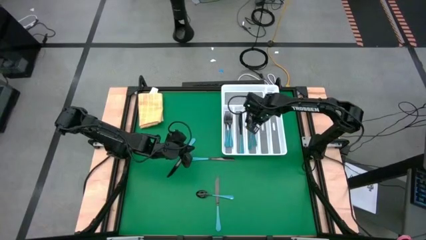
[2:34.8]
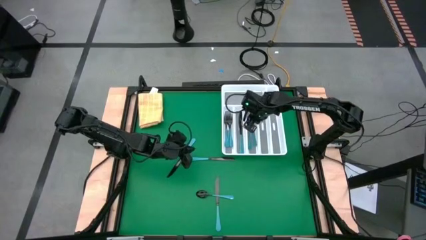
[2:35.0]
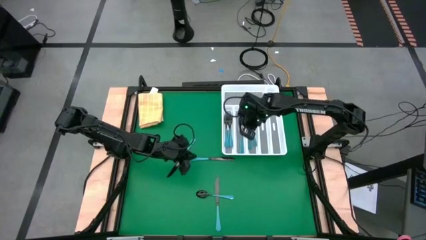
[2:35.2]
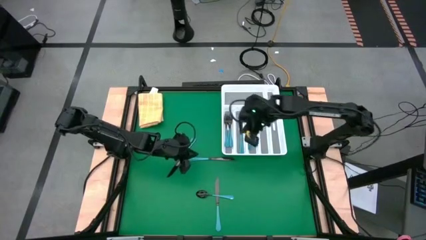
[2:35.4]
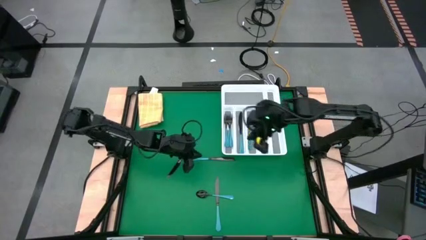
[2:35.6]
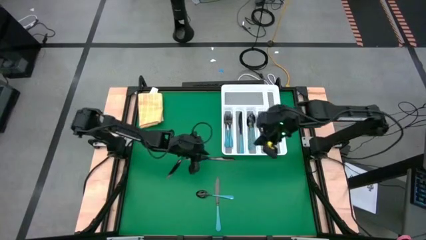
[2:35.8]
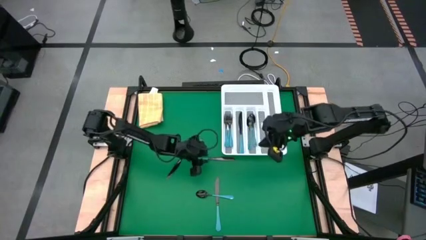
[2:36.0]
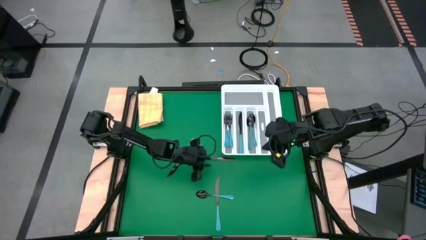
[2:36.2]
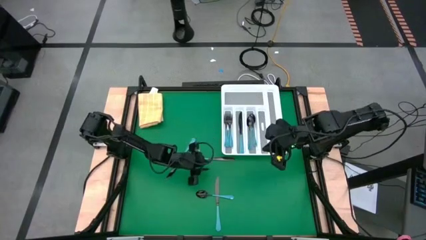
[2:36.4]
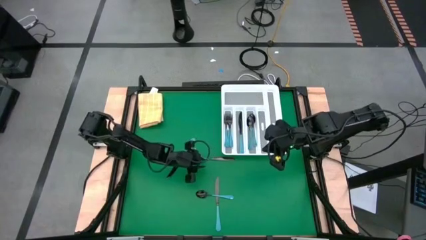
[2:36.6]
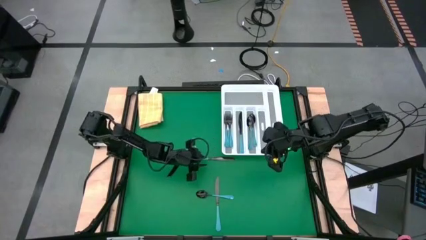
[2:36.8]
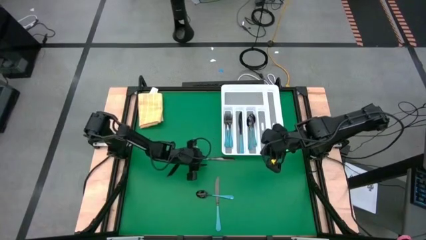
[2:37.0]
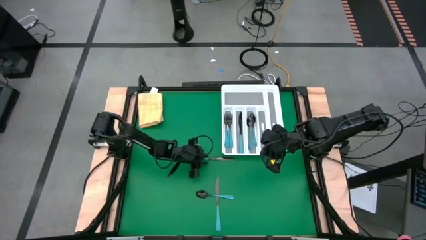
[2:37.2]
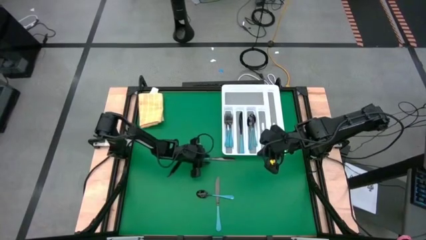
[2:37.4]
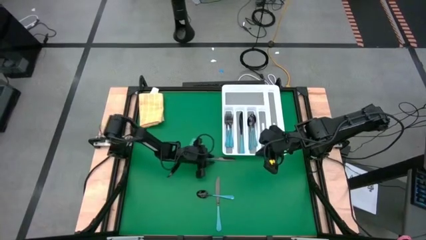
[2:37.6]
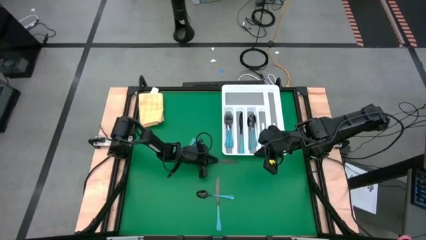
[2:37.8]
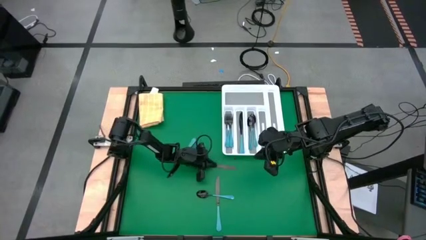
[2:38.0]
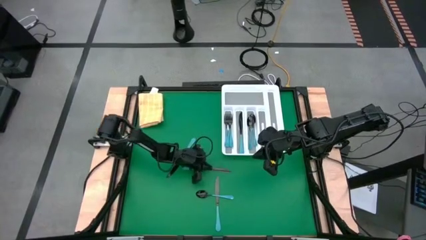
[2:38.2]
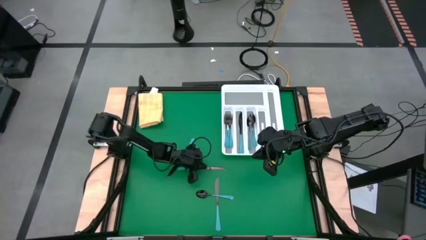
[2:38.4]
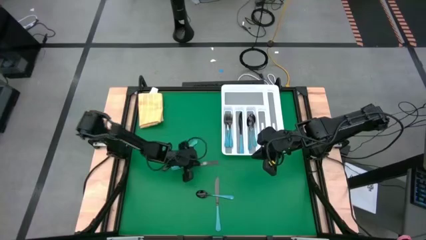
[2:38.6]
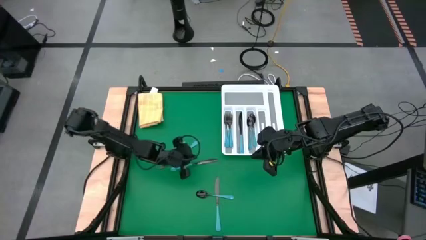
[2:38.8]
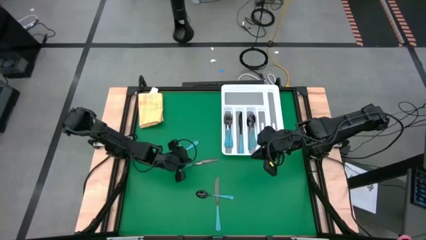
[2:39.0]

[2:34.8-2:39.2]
Task: Sort silverware
Put the blue table knife into the silverware organizer

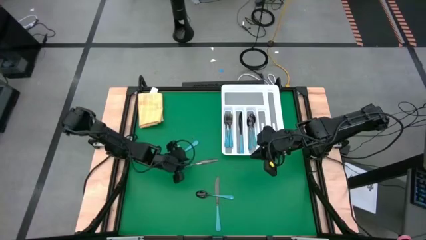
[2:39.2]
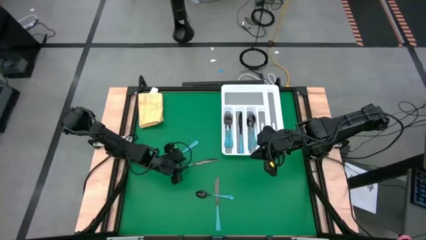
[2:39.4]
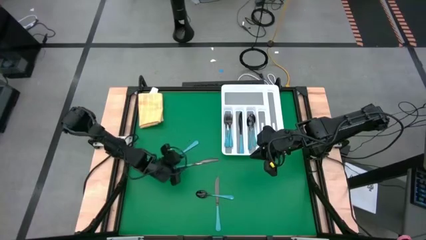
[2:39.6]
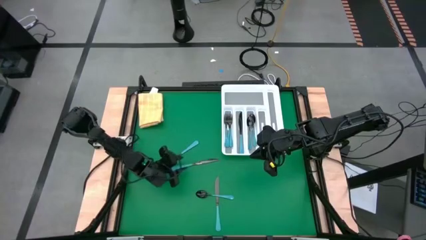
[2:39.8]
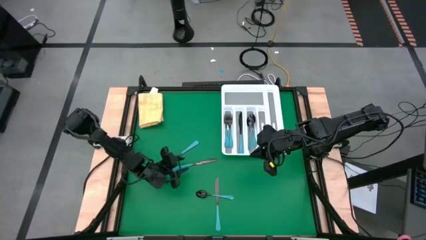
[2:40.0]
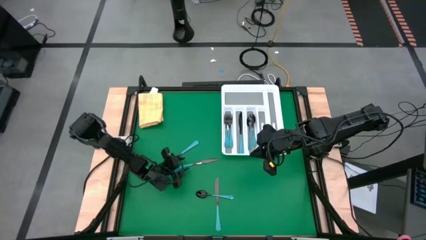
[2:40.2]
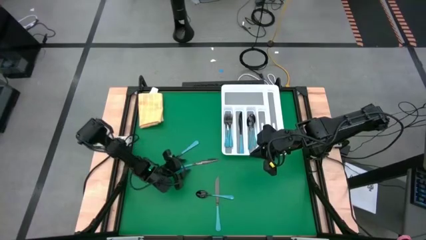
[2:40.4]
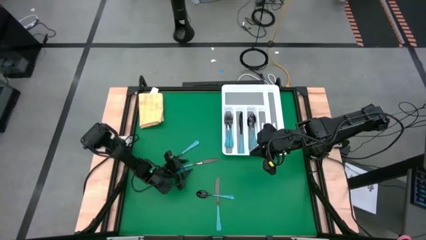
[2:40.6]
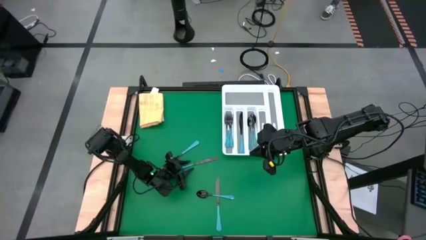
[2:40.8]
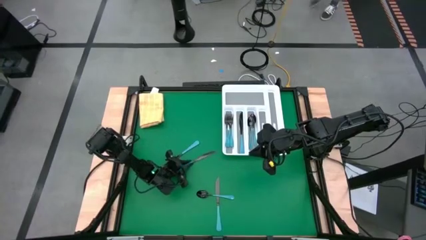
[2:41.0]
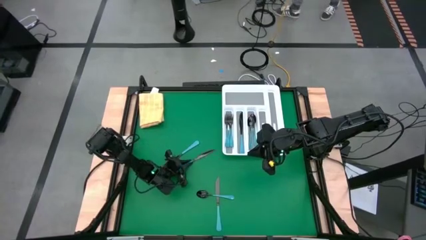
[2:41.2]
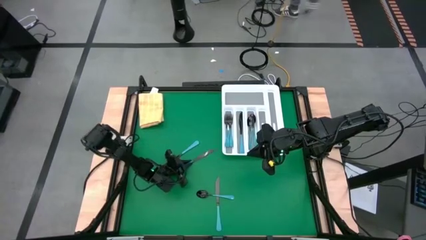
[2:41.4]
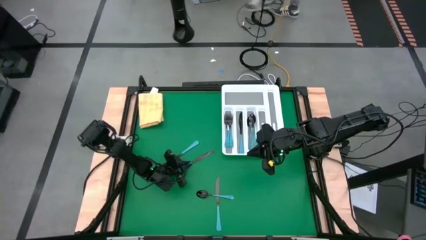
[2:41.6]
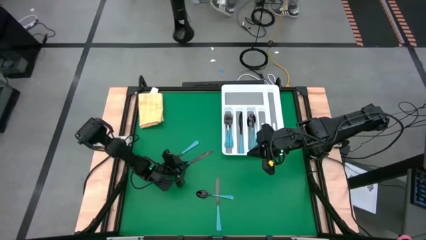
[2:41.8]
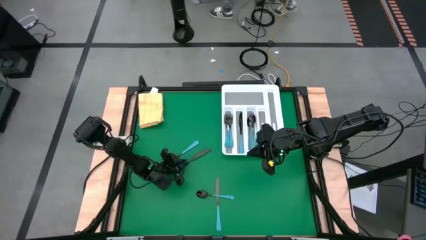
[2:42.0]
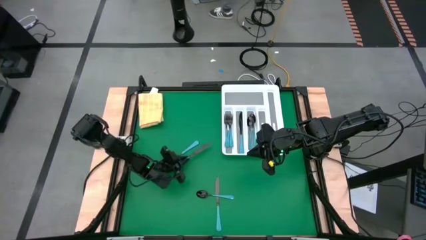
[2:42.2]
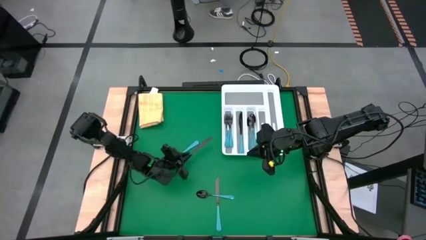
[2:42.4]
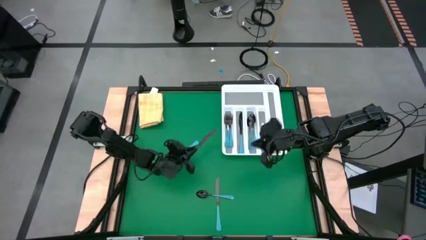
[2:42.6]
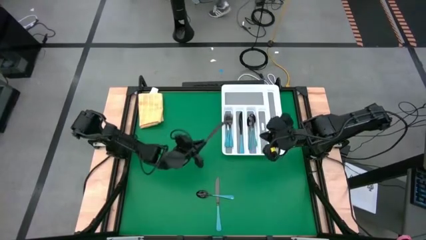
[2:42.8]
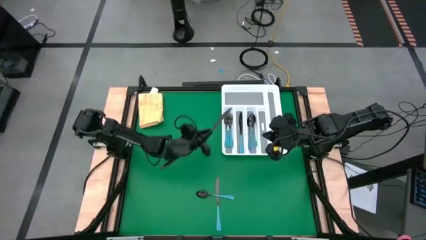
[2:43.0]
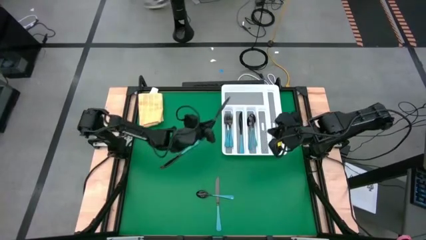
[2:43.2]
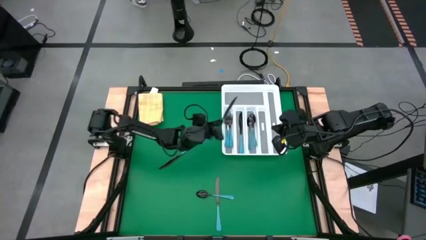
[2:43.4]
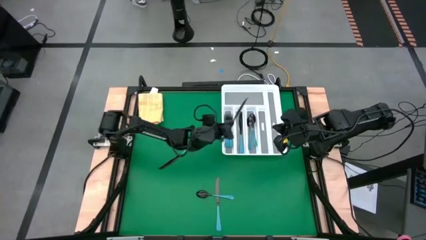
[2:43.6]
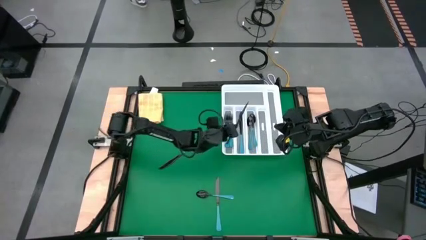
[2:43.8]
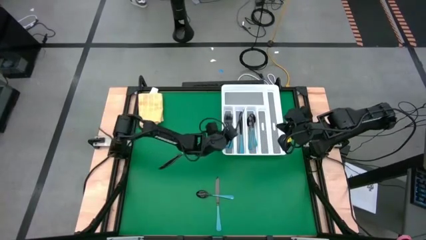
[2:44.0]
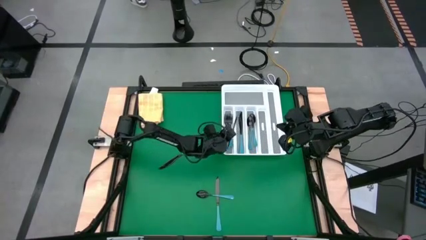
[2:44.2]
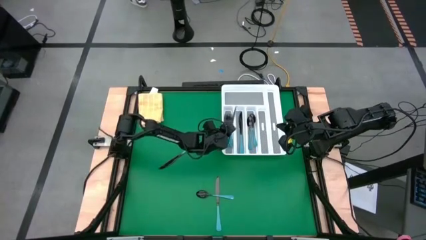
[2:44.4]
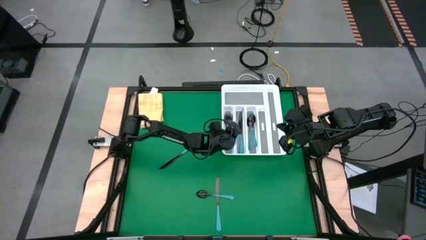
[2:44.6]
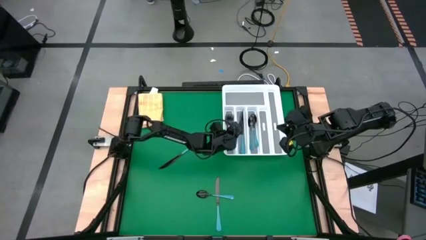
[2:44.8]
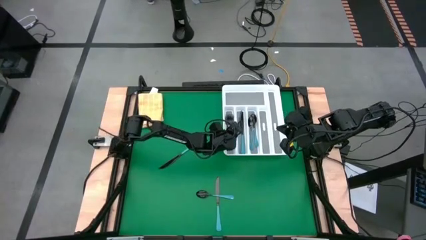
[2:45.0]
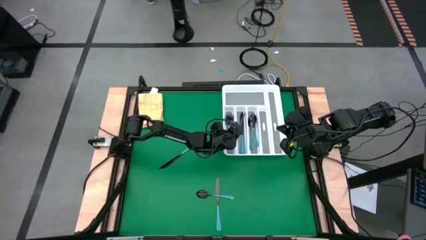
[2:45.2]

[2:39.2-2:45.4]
Put the blue table knife into the silverware organizer

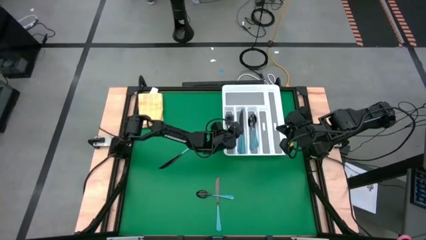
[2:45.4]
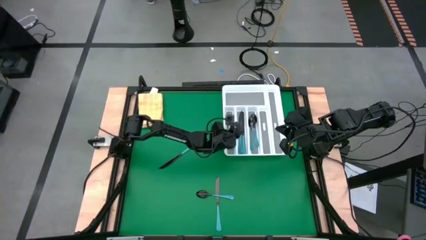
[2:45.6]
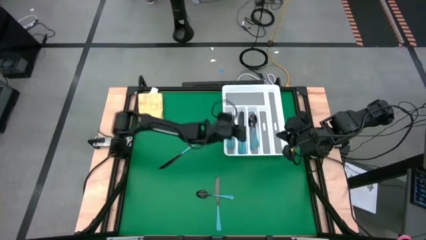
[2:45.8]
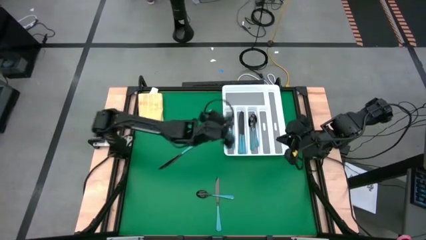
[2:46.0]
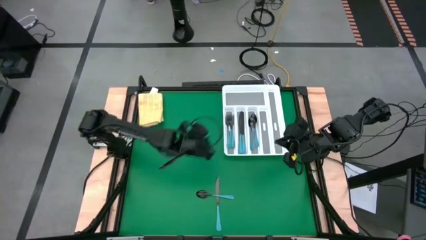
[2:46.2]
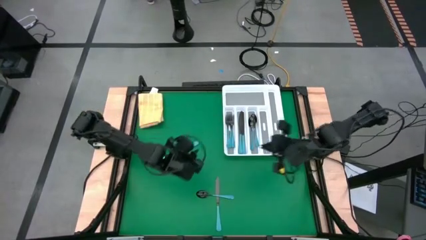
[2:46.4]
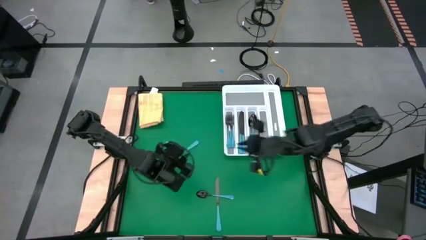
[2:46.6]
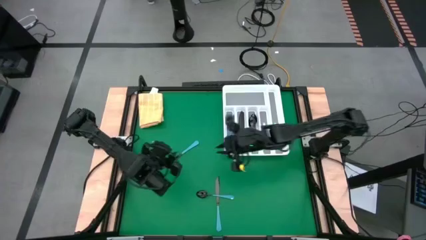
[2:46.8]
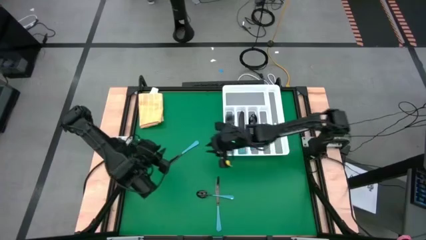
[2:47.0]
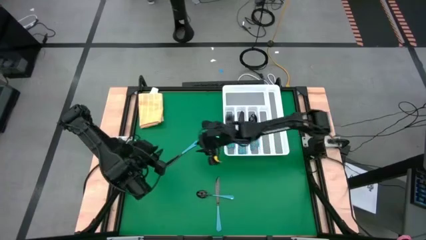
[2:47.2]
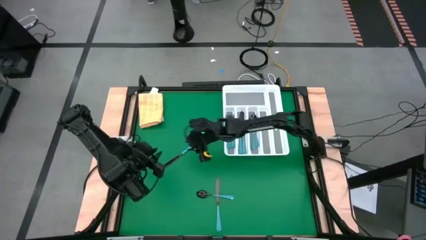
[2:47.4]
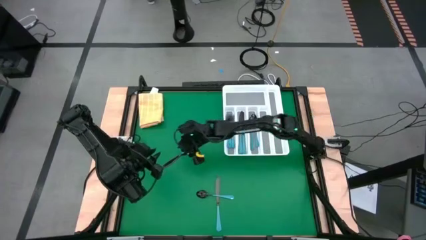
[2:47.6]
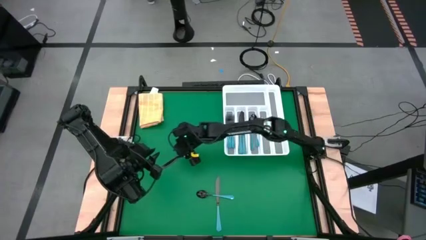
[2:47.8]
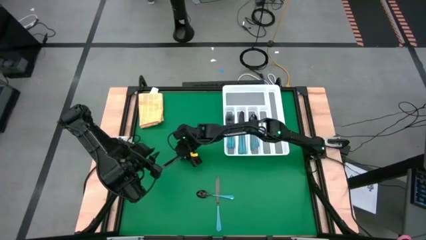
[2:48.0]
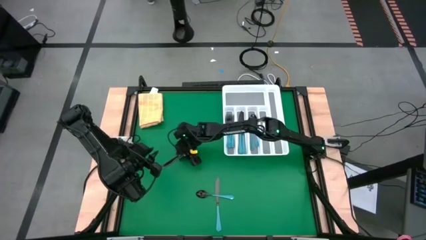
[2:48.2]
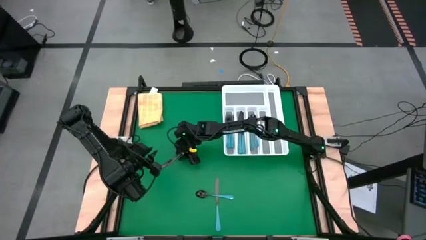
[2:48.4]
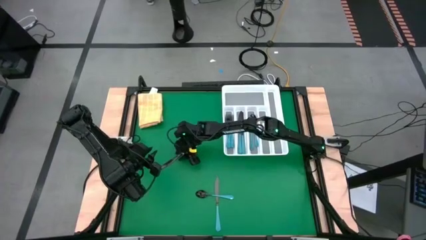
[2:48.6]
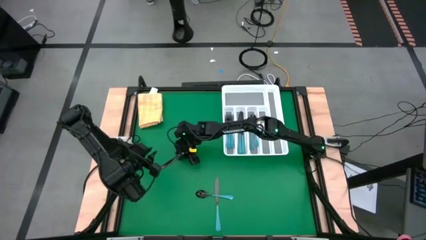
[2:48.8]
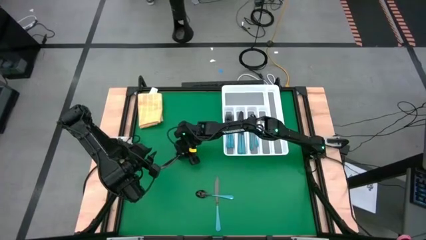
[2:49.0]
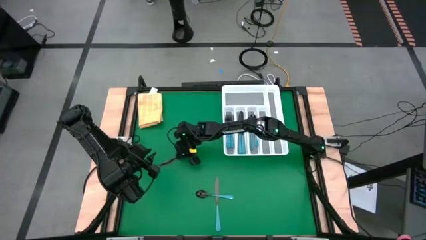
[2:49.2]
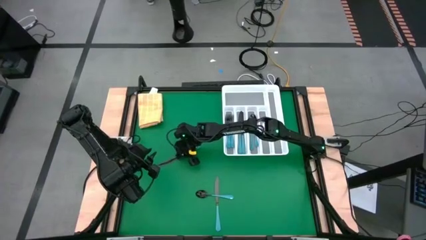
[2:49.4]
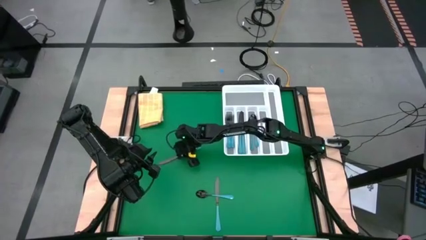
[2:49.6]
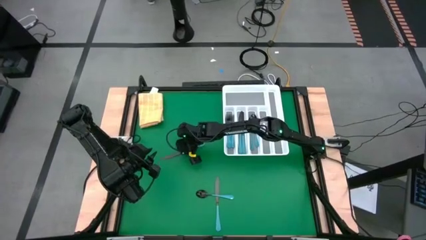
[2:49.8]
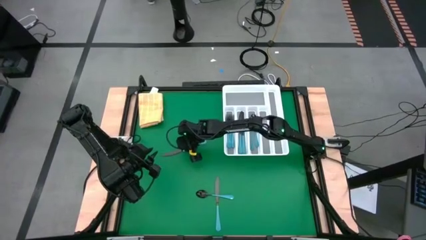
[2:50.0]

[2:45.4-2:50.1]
Put the blue table knife into the silverware organizer

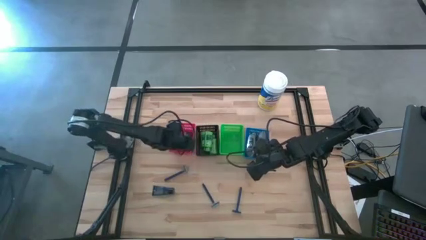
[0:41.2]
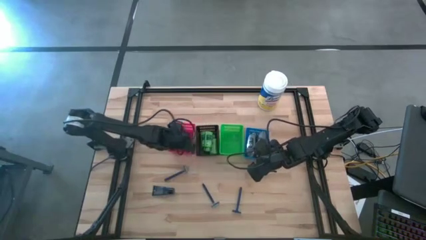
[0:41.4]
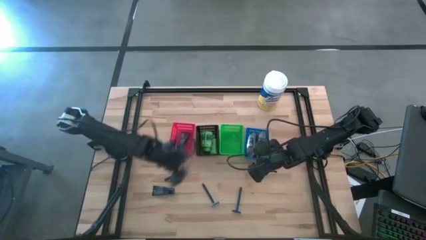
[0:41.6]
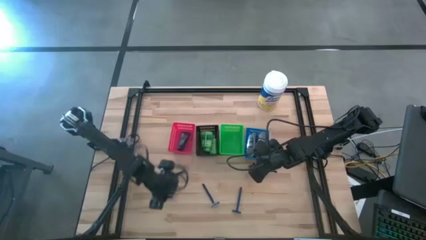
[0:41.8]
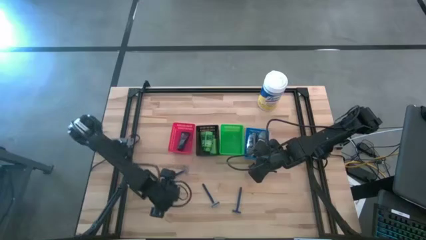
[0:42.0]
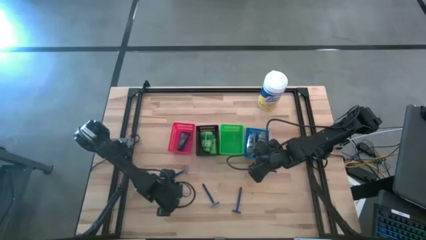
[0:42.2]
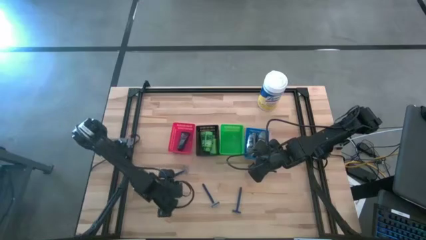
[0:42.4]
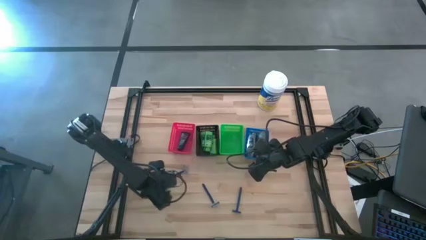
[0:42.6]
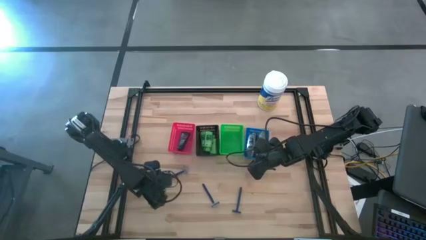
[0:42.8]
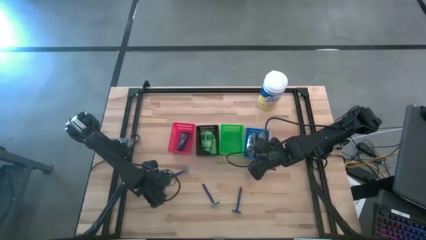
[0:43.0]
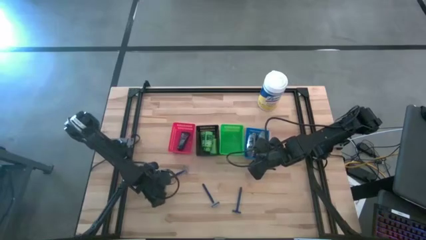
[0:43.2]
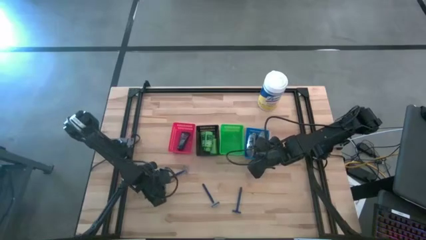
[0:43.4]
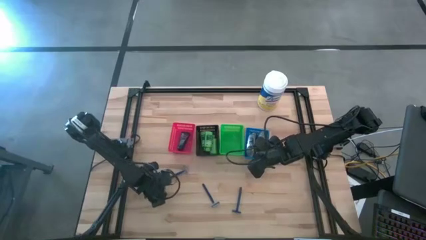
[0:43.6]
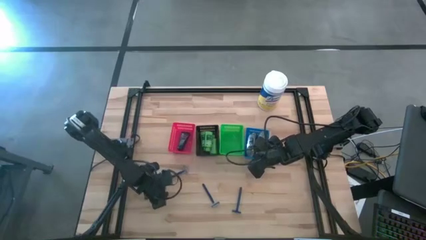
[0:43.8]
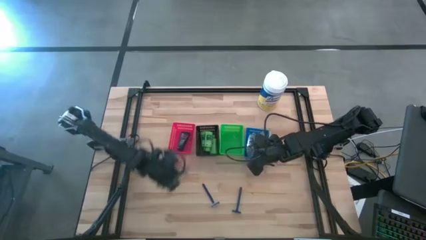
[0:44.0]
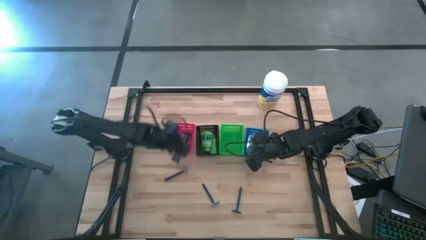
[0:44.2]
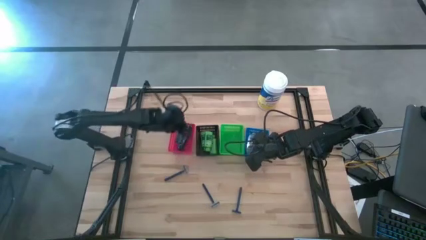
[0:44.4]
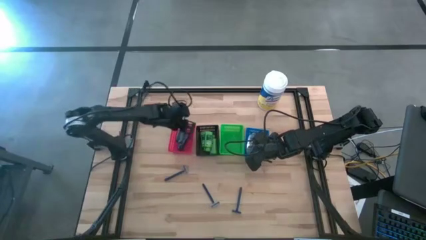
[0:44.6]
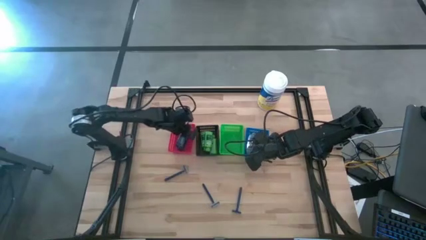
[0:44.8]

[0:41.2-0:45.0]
Task: Pick & Place Travel size toiletries
Put the blue shave cream into the red bin
